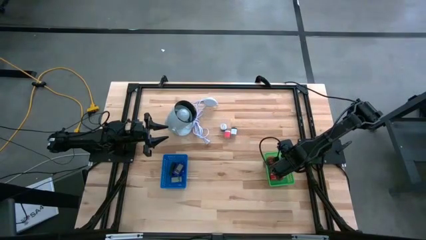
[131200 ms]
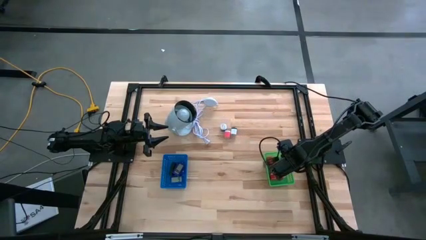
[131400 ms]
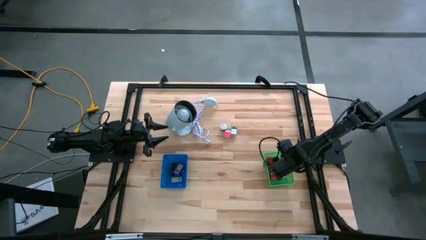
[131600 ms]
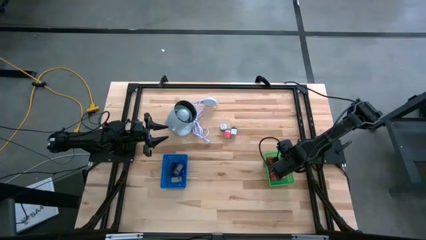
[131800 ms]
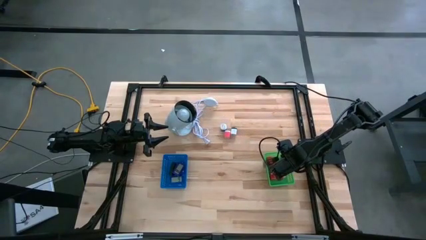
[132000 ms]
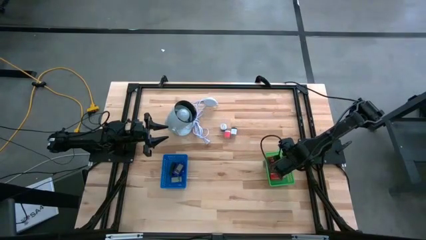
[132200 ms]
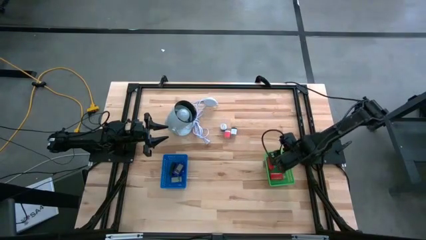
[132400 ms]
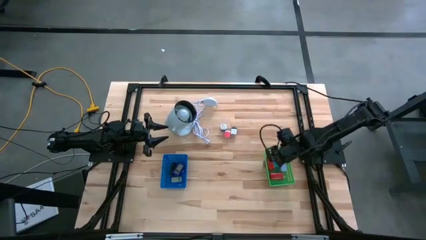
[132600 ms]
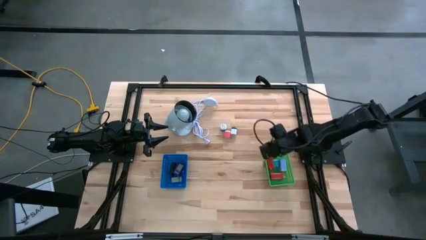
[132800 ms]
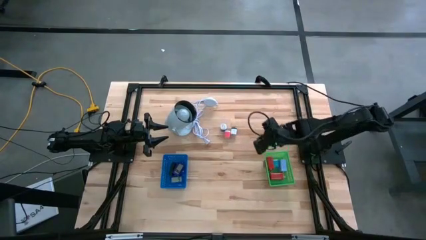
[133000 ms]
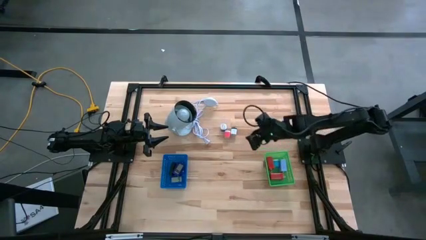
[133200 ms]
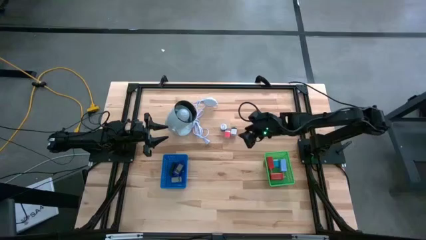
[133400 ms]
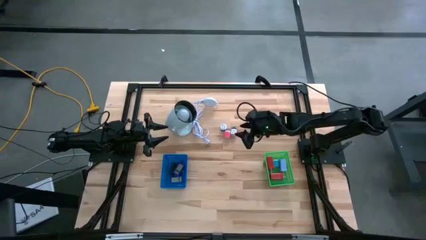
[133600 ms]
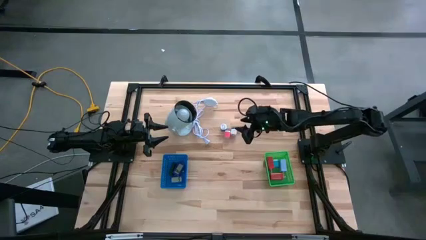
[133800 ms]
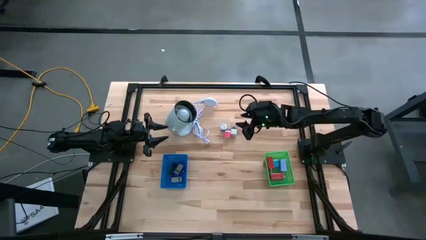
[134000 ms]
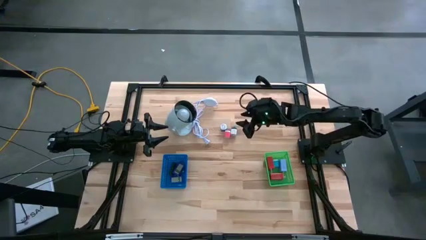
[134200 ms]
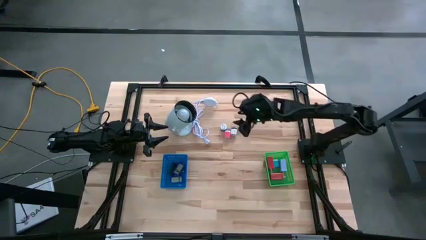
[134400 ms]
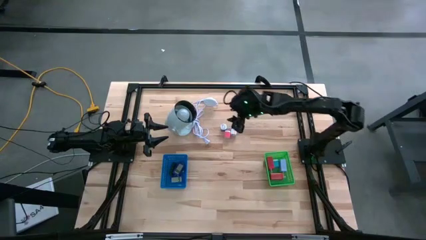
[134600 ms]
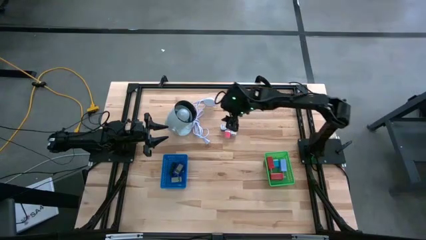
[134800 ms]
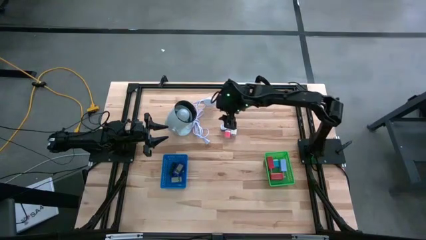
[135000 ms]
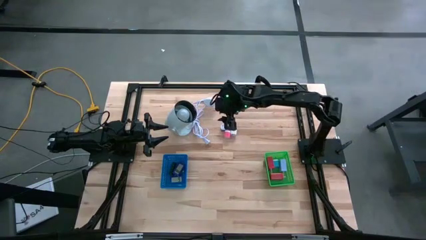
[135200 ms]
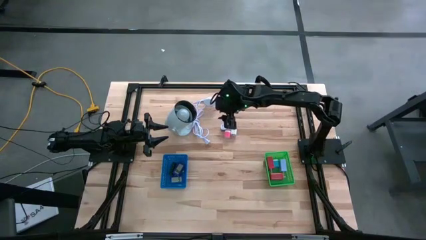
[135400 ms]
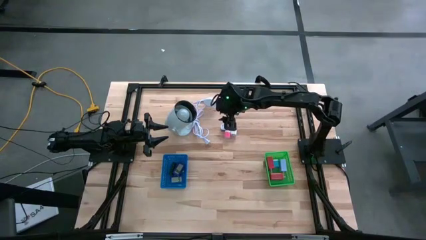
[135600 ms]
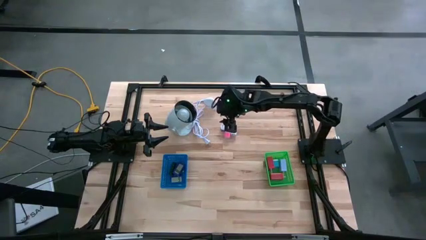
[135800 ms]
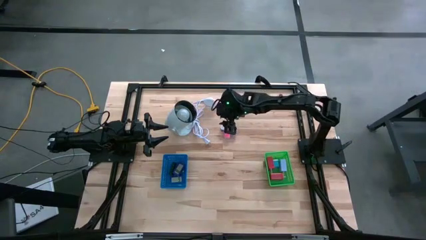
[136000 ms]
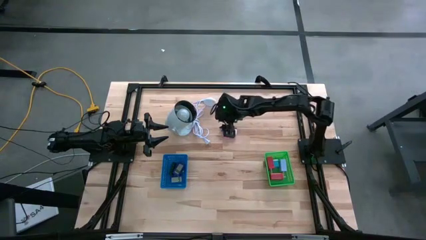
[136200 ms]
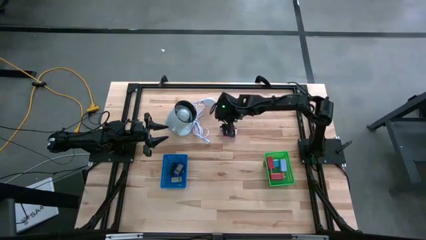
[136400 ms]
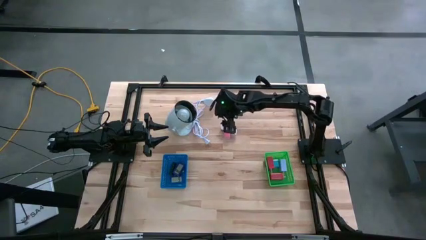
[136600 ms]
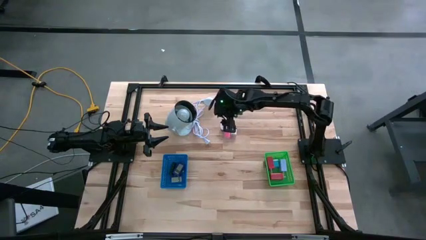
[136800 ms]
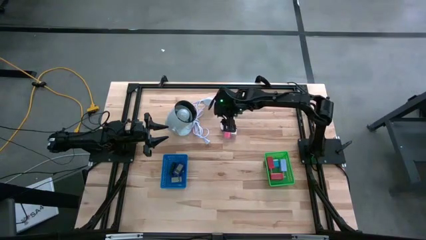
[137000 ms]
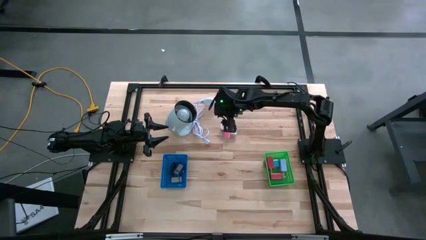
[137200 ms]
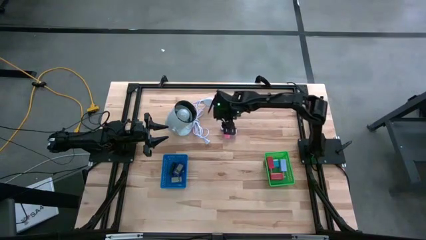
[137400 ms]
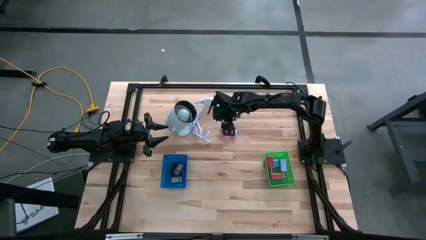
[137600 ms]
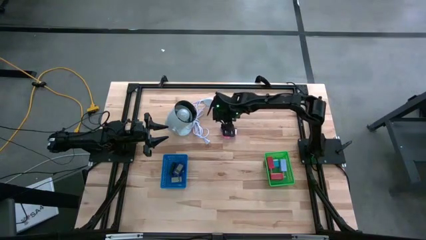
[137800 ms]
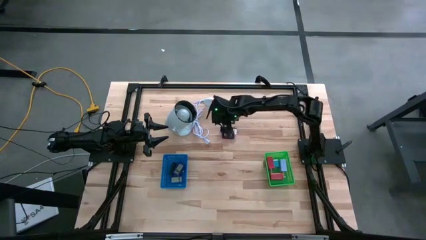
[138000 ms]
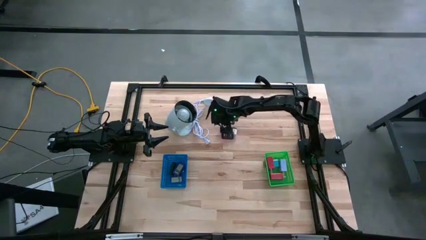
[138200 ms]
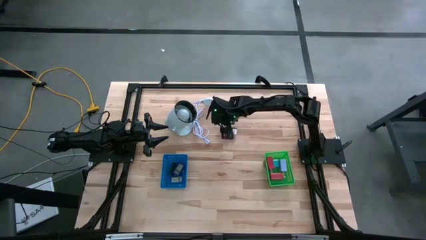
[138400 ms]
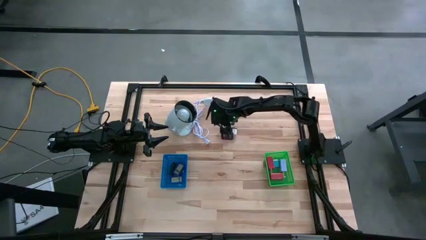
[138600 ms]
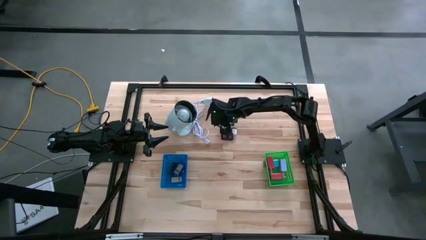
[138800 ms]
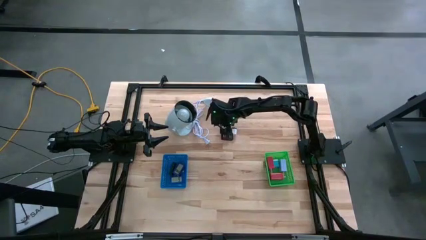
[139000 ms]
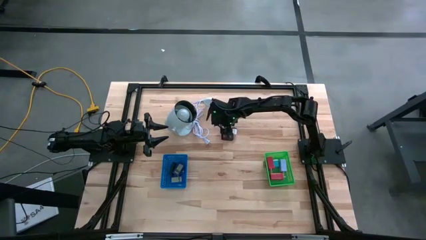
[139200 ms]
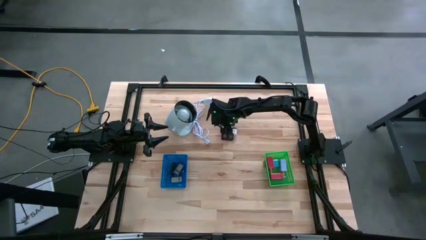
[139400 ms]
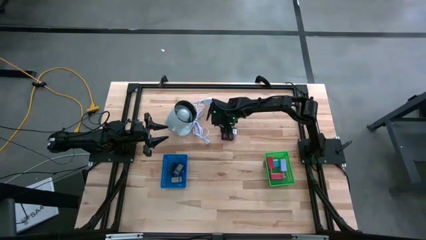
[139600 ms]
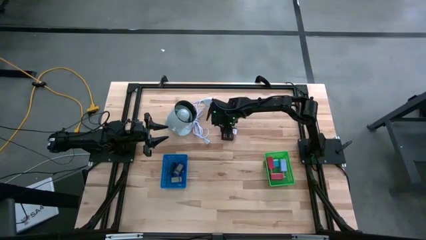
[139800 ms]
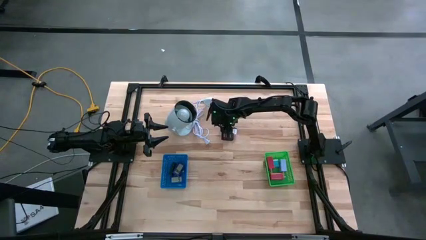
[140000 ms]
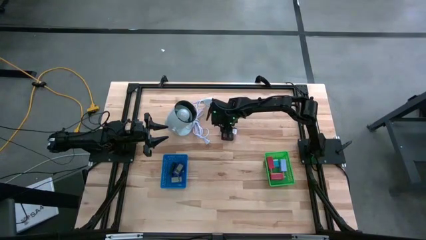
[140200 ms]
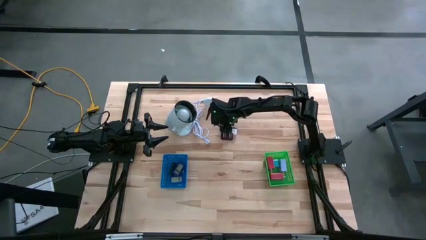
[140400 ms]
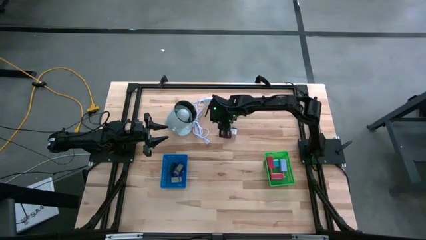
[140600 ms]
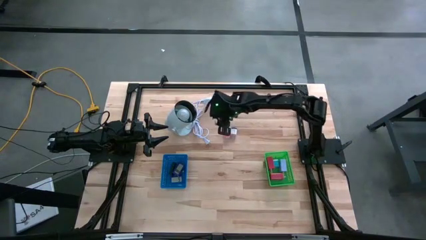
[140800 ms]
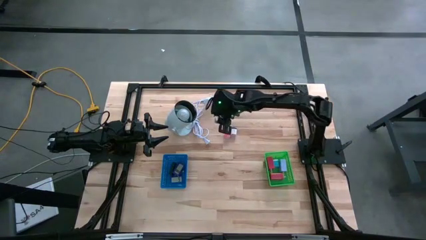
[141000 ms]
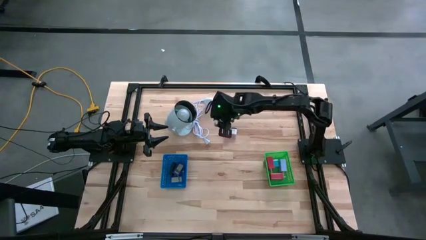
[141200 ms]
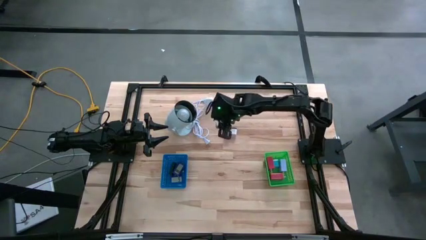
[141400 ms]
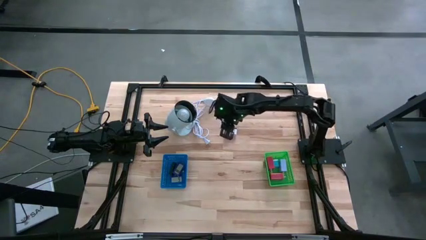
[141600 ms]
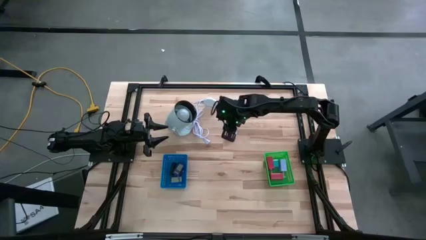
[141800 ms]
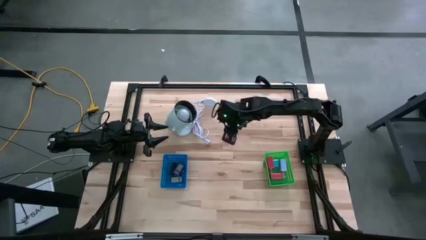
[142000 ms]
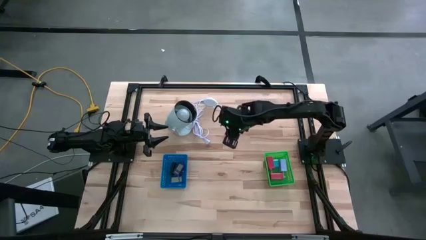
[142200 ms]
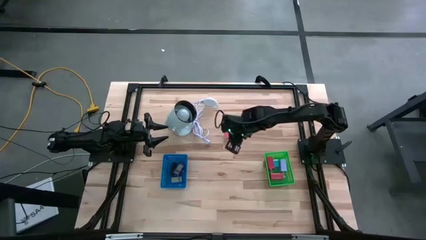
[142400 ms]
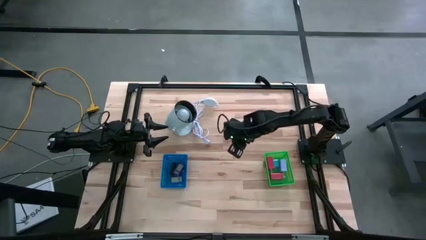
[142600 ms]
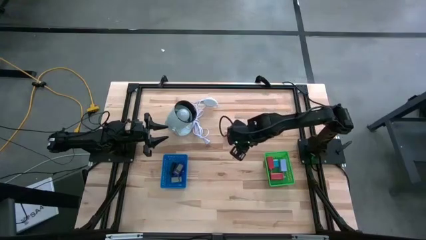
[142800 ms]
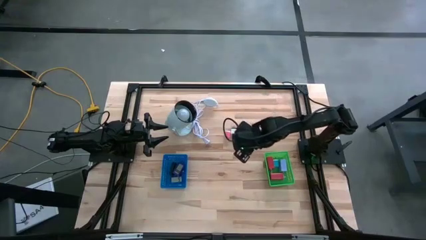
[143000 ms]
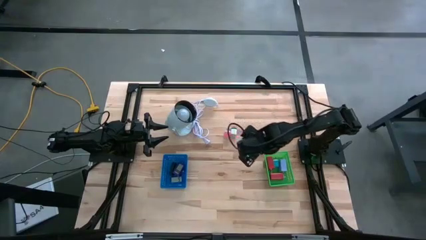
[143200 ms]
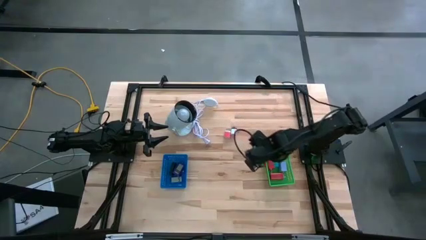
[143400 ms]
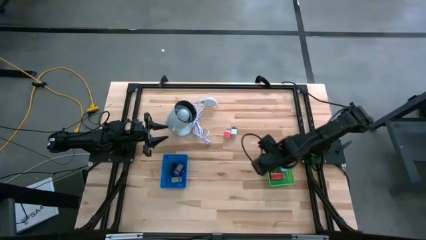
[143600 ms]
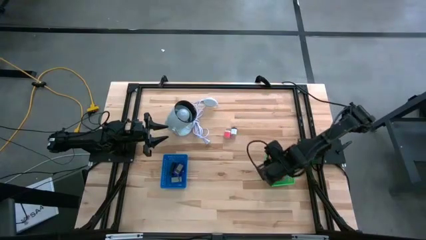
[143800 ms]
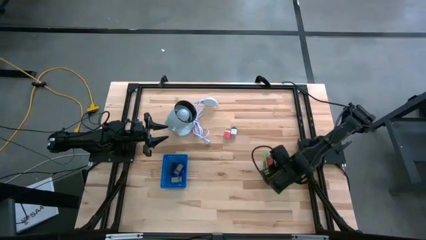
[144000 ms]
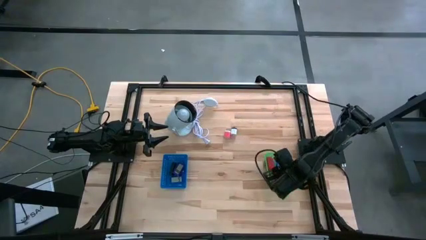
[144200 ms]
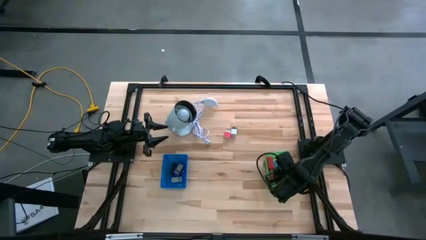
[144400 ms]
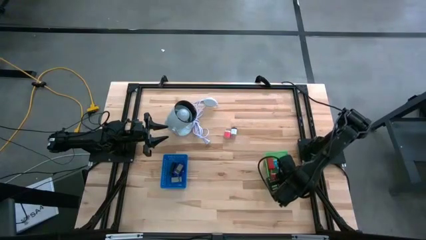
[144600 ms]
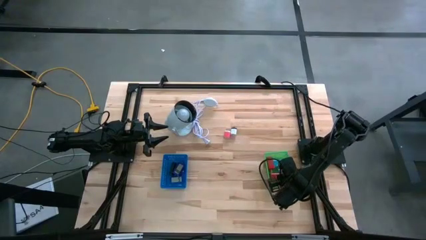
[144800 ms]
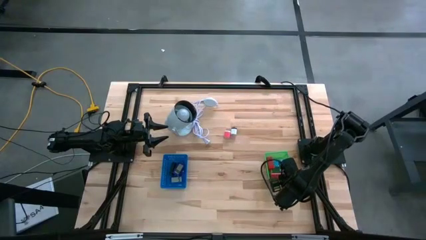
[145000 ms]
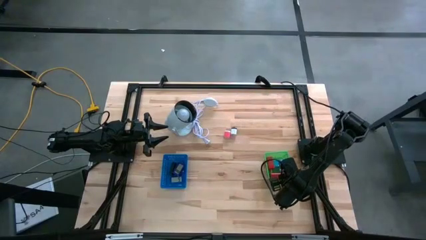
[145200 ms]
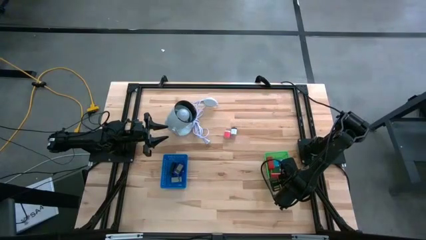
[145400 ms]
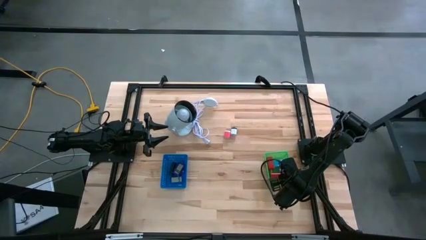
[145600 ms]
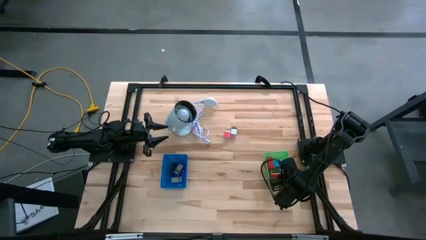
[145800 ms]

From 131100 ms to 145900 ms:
Task: Pick & Place Office items
Put the purple charger adapter into the green bin

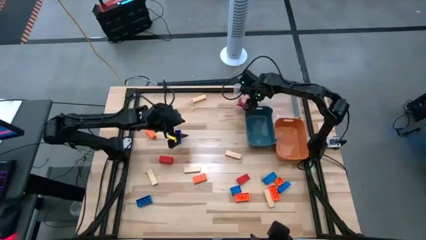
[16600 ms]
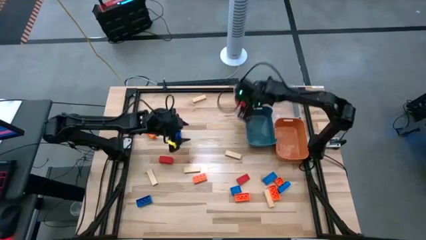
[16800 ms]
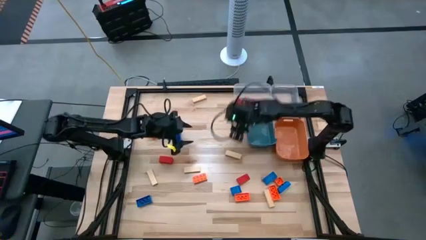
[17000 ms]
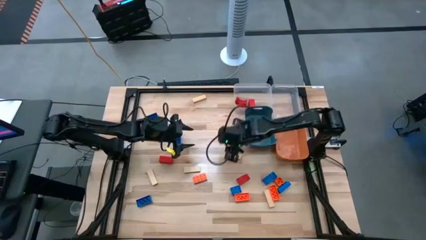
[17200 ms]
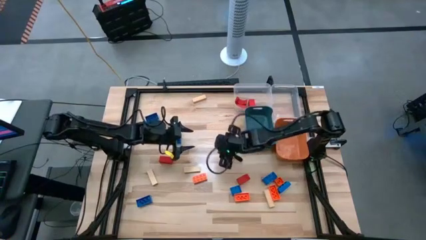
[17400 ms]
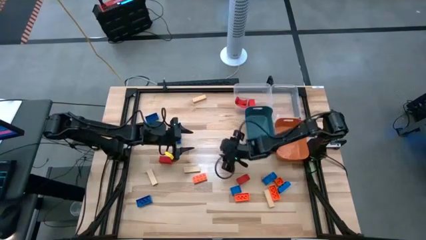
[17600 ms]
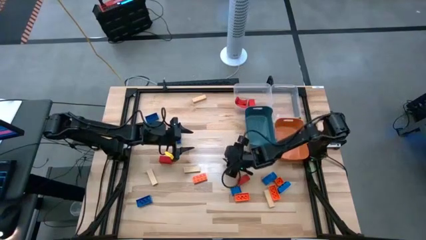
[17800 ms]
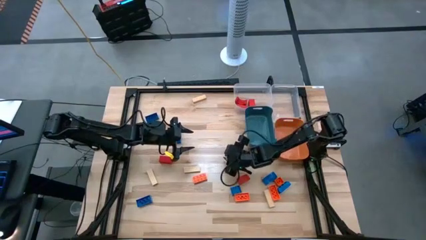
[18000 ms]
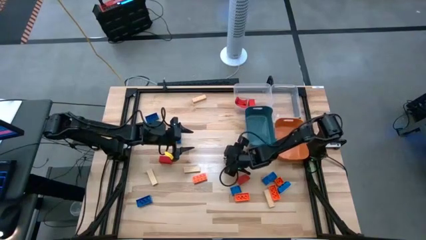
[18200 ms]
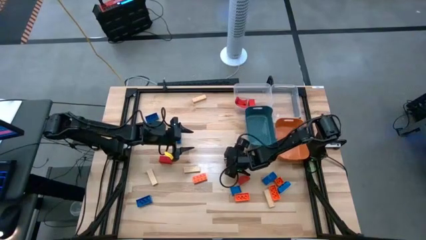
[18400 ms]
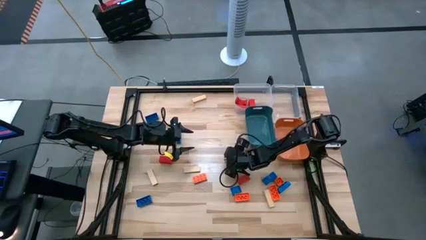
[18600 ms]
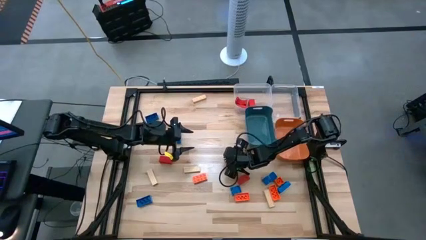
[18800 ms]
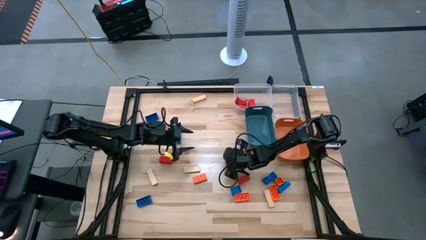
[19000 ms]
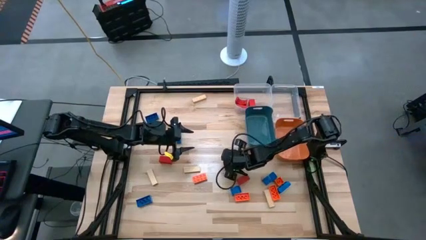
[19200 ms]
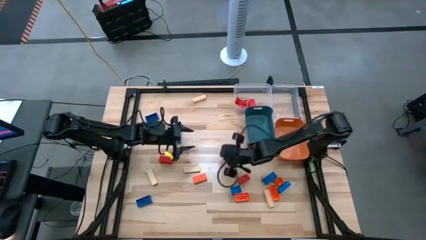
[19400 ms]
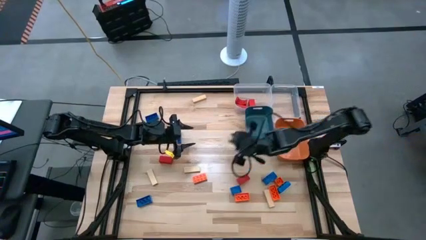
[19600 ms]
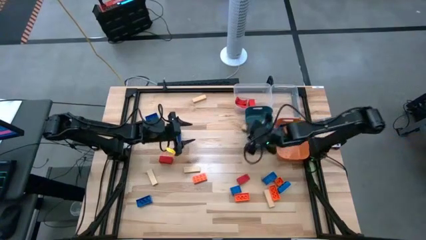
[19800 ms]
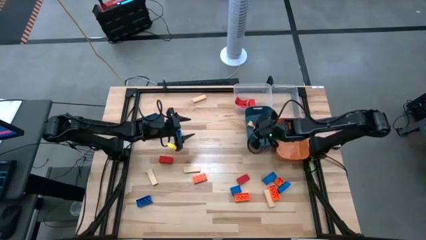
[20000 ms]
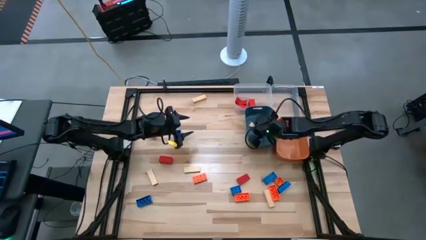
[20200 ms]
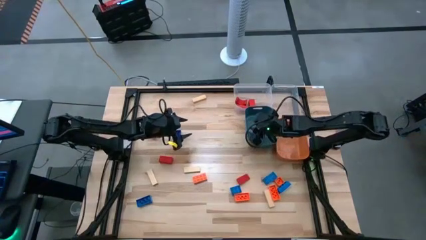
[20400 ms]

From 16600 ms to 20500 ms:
Task: Sort blocks
Put the brown block into the blue bin
